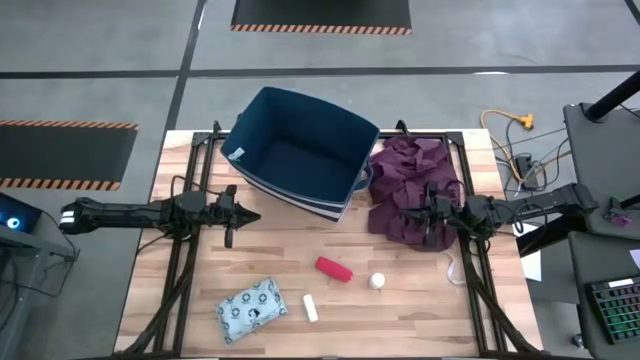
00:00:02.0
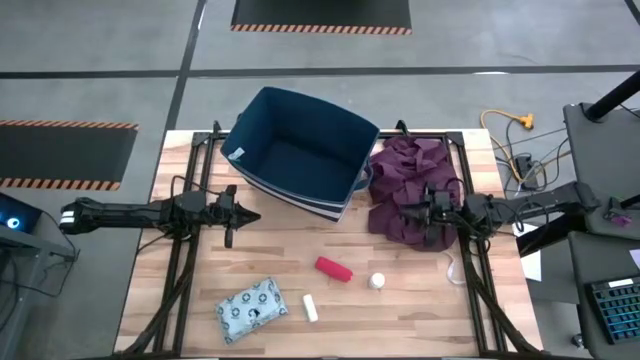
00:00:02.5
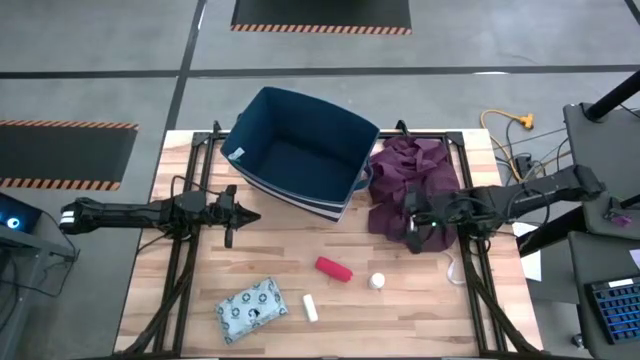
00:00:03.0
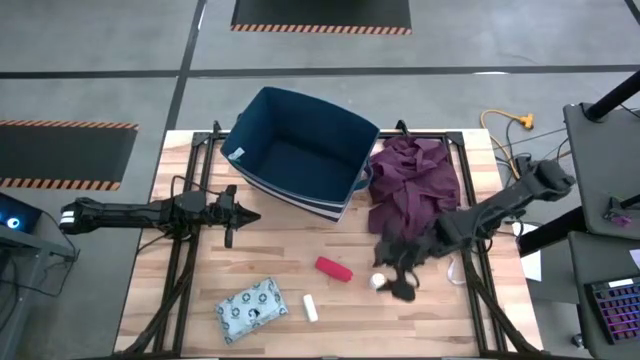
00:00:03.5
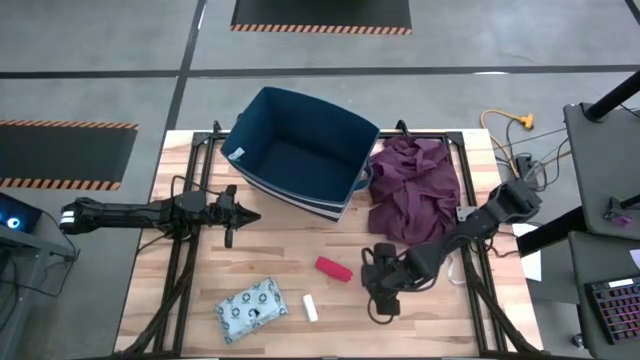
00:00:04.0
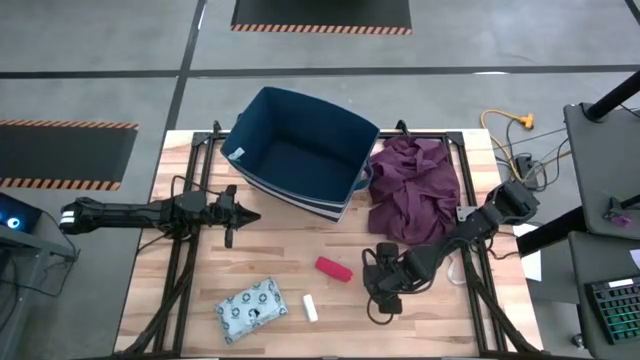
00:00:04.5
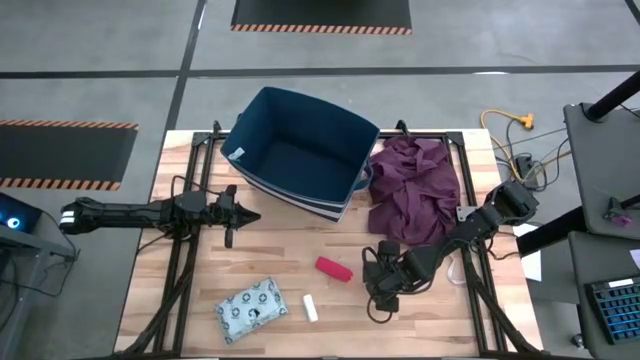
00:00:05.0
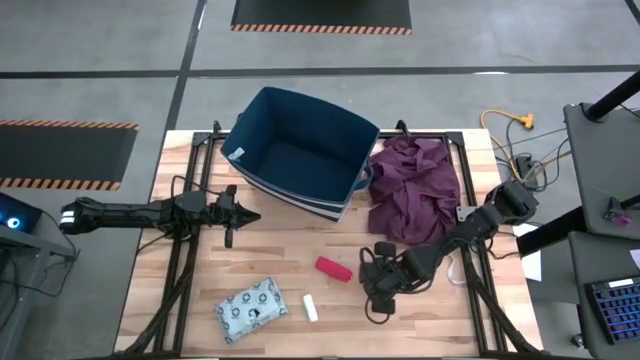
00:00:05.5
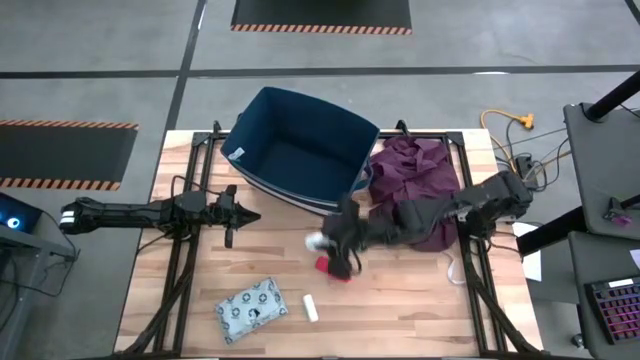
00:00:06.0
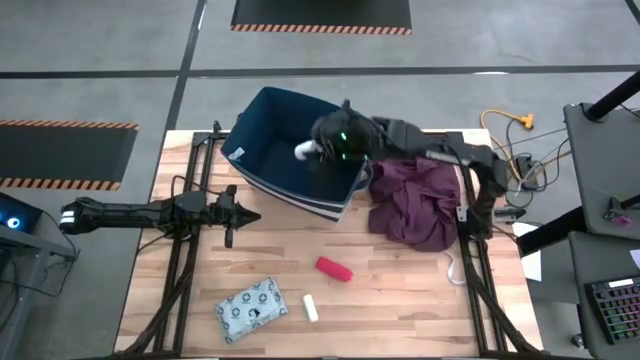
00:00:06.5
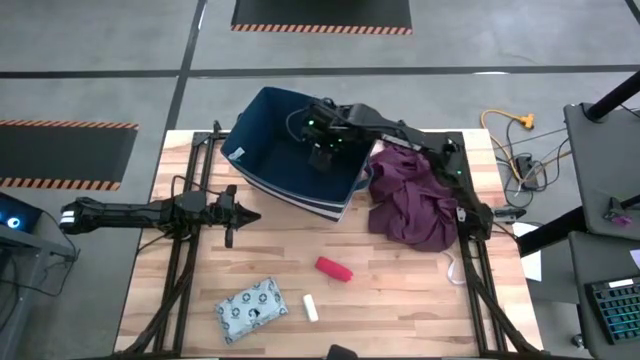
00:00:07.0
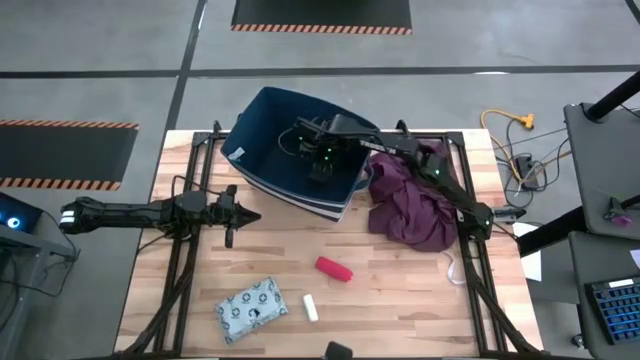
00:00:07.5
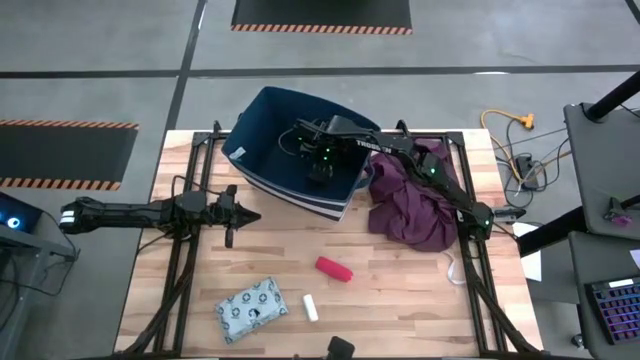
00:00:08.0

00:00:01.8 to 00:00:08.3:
Task: Pick & place medical supplies in basket/bin
Put the white pill bottle into the blue bin

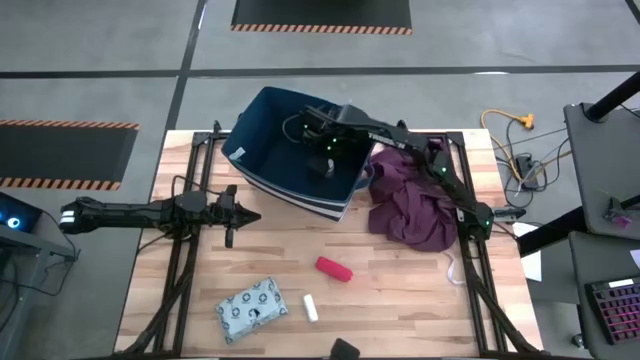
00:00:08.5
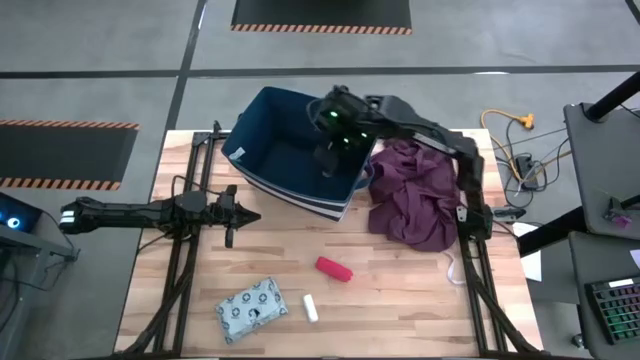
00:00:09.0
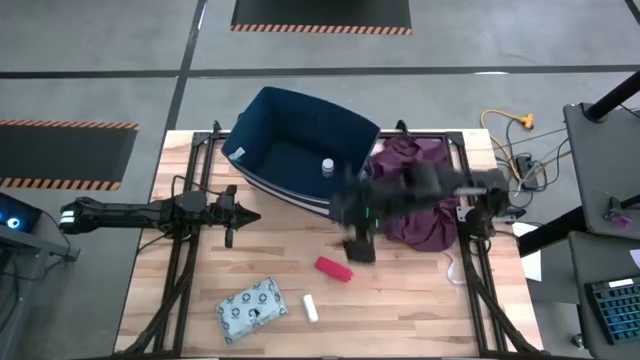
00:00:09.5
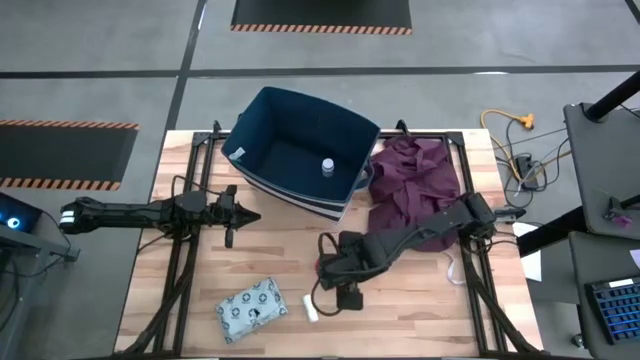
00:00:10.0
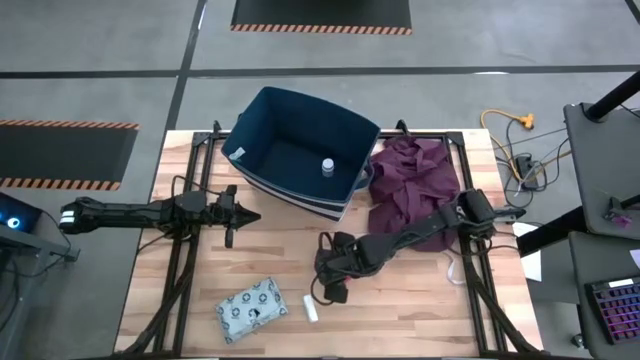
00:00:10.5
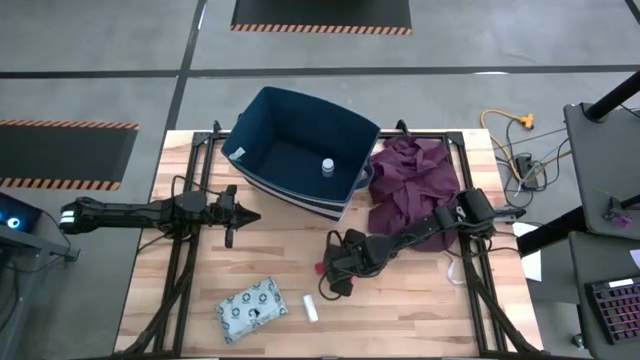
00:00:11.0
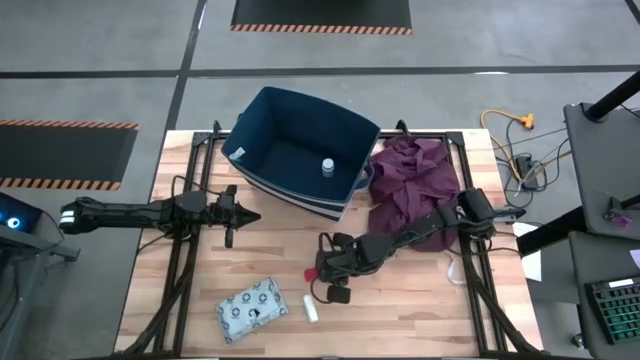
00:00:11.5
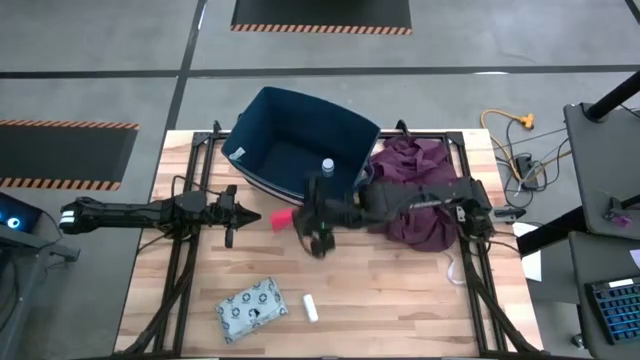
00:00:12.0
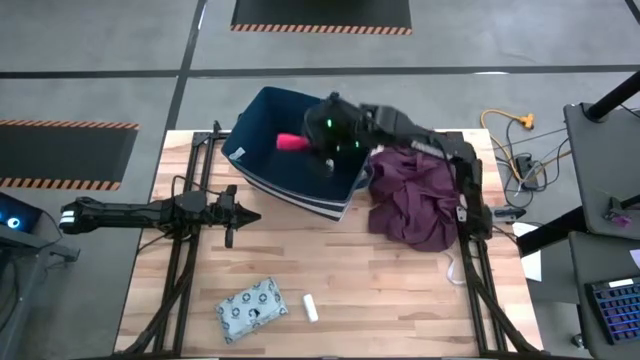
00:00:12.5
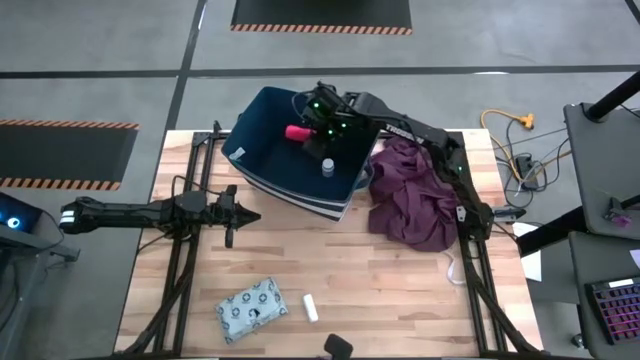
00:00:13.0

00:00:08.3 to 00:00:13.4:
Put the red rolled bandage into the blue bin

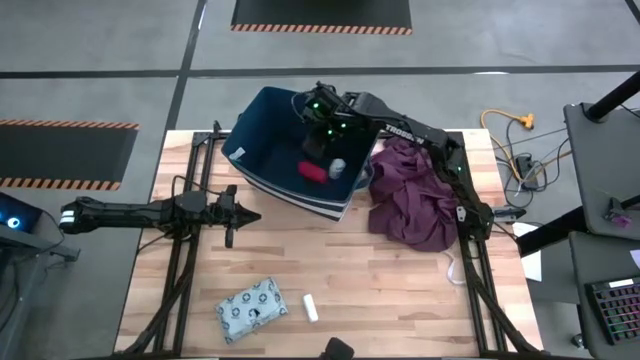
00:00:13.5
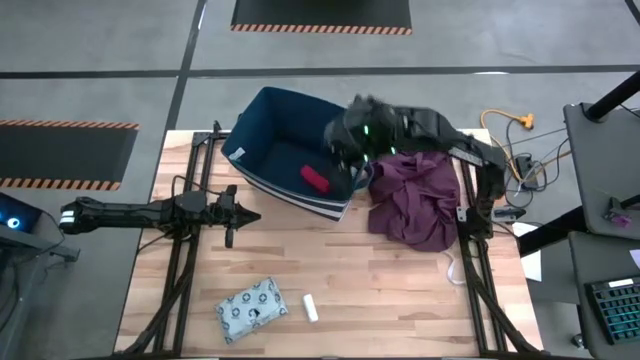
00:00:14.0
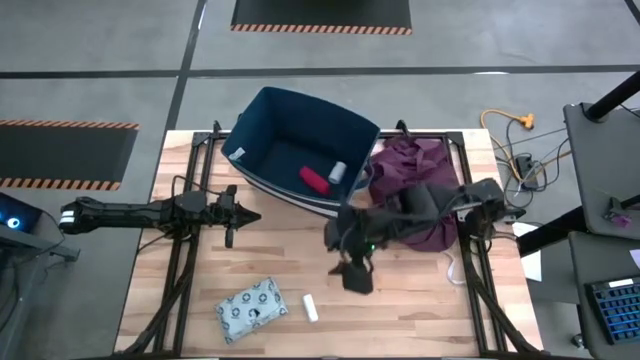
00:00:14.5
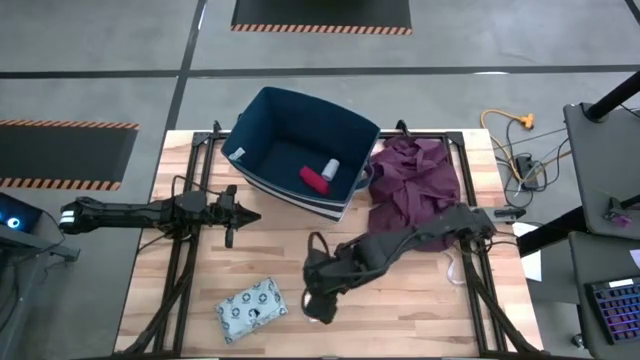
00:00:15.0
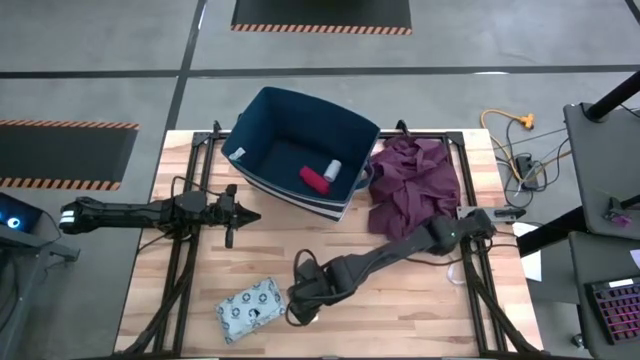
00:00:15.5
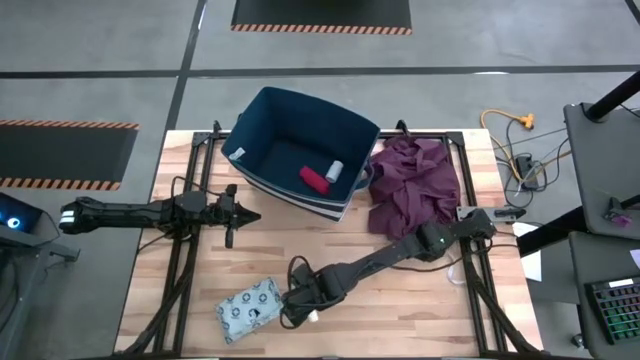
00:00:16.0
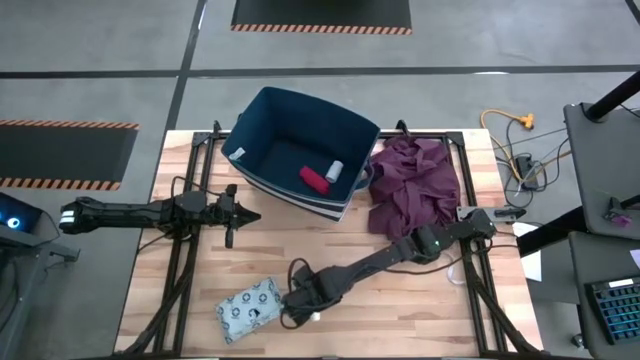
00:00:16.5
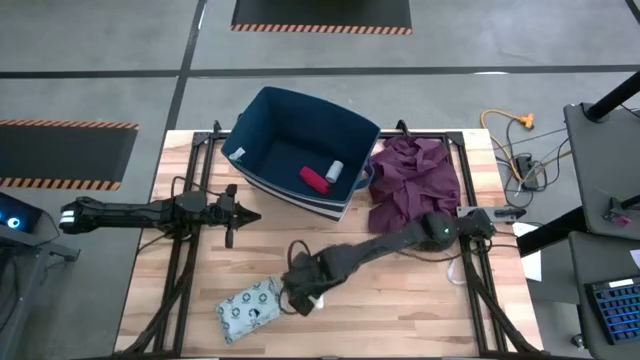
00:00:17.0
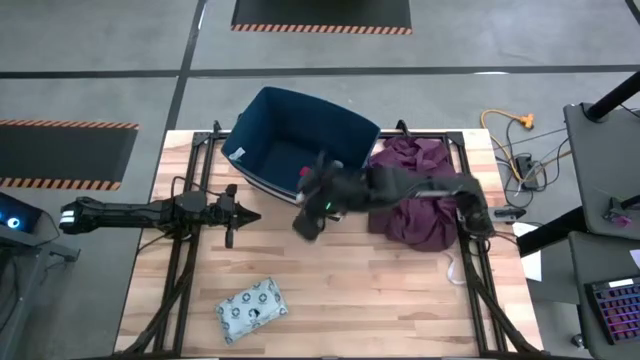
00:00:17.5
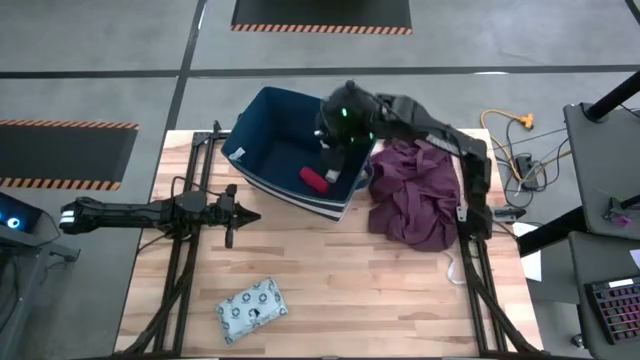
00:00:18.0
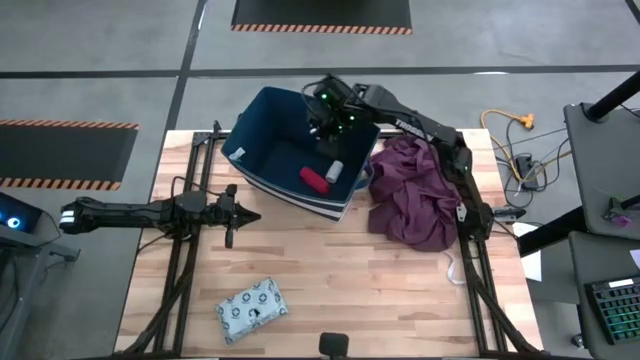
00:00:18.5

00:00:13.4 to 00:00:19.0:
Put the white rolled gauze into the blue bin

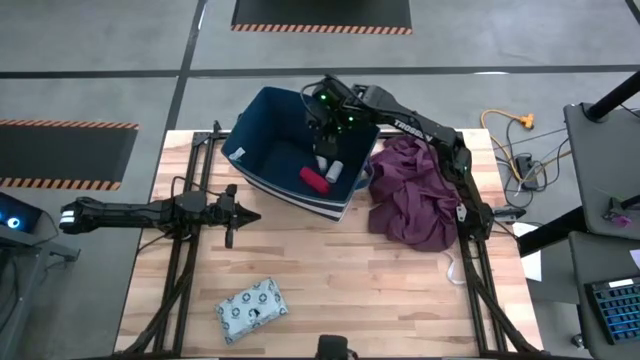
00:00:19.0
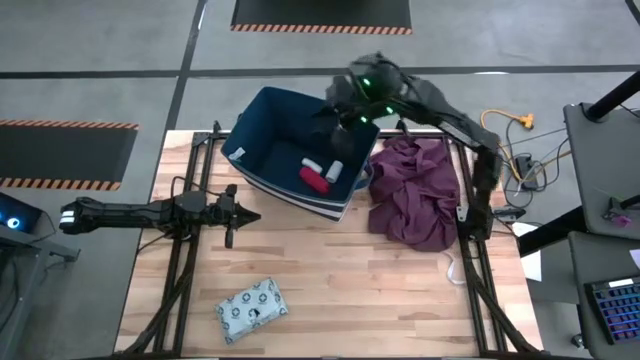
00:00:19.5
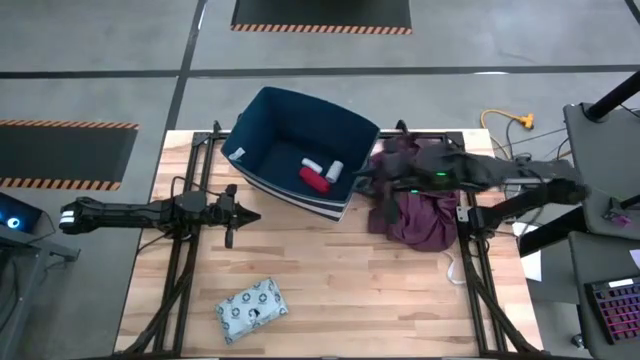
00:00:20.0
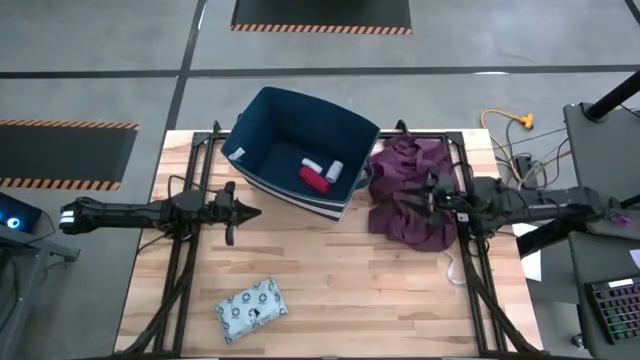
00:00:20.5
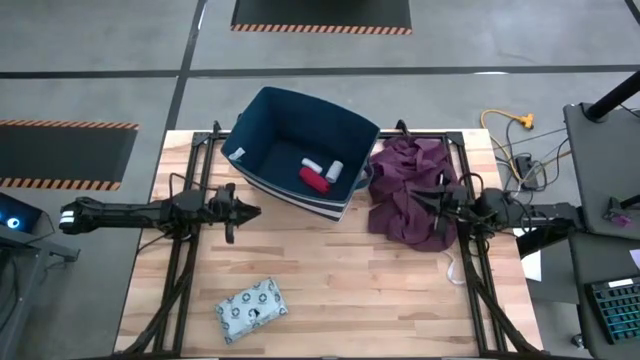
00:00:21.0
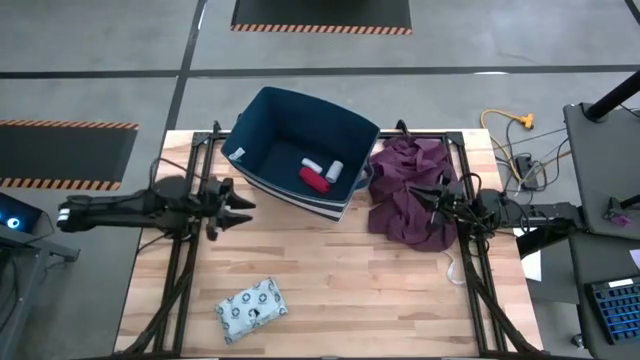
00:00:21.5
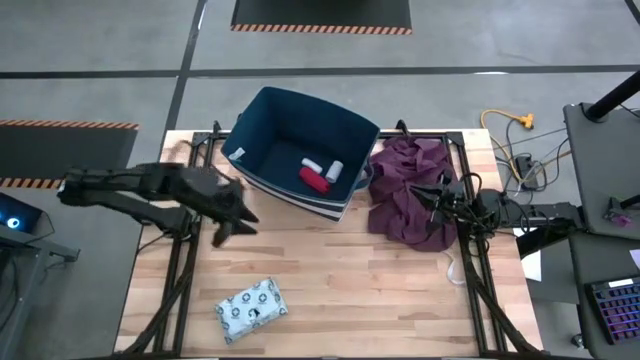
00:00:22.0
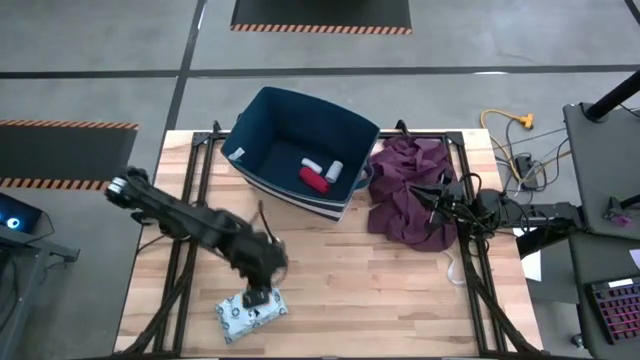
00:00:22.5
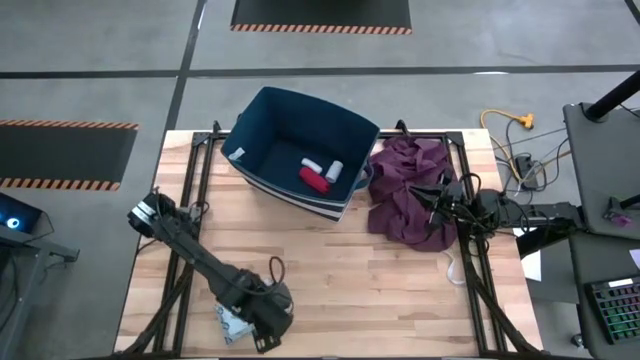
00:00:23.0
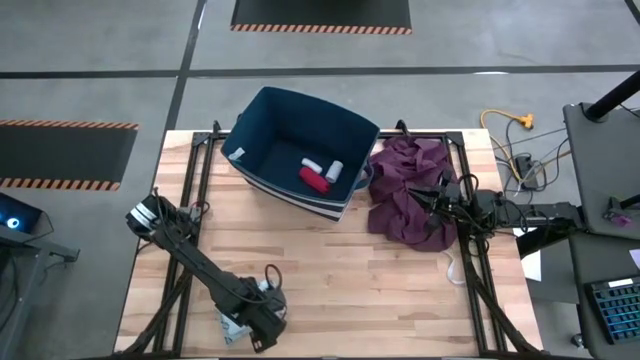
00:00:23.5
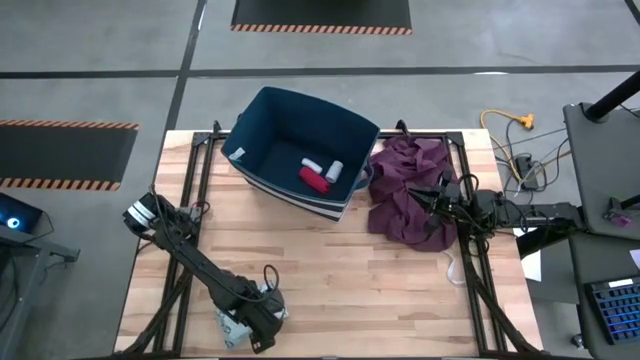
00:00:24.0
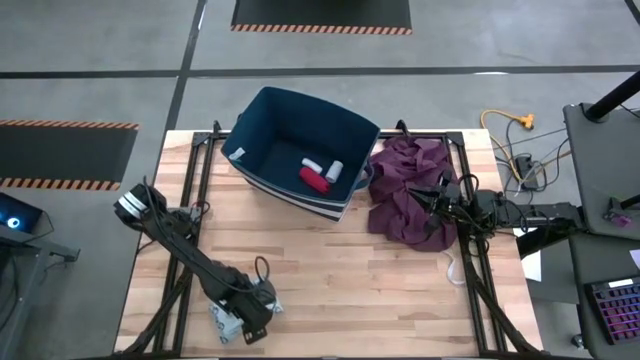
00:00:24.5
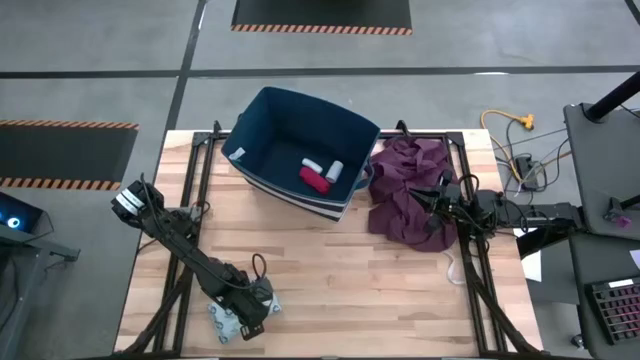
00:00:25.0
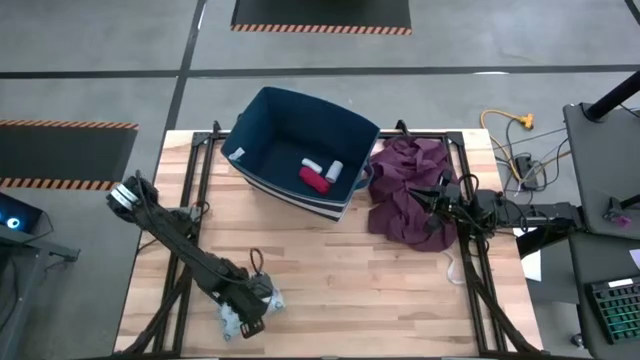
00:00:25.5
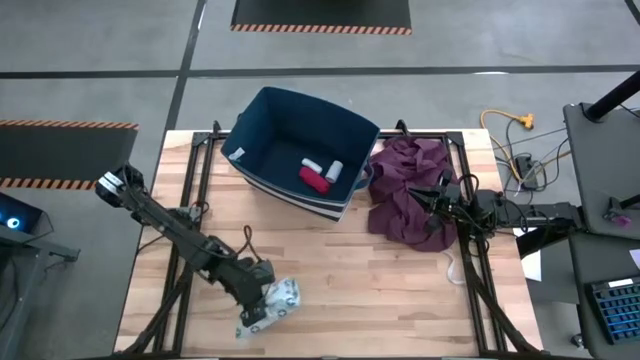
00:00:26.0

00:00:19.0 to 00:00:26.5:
Put the white mailer bag into the blue bin
